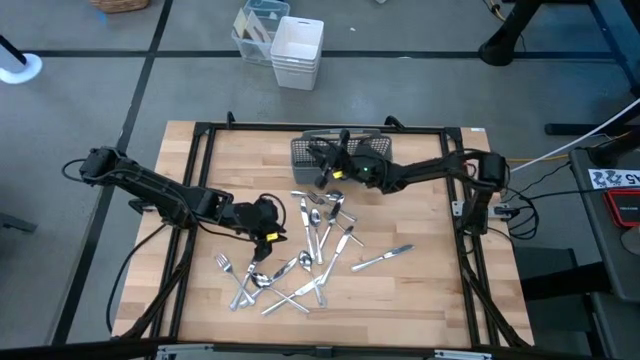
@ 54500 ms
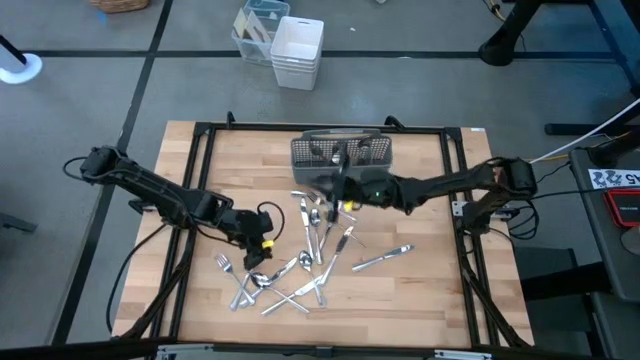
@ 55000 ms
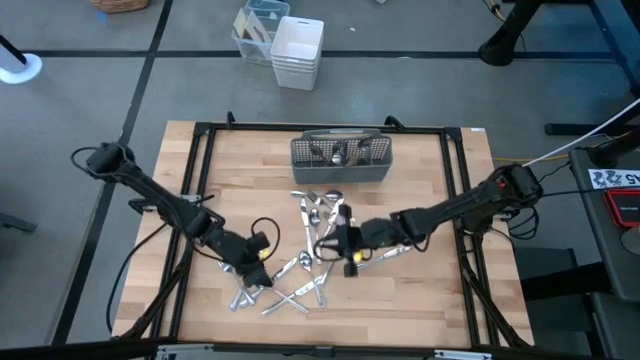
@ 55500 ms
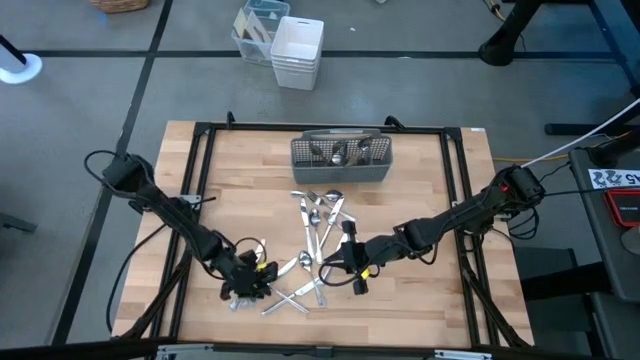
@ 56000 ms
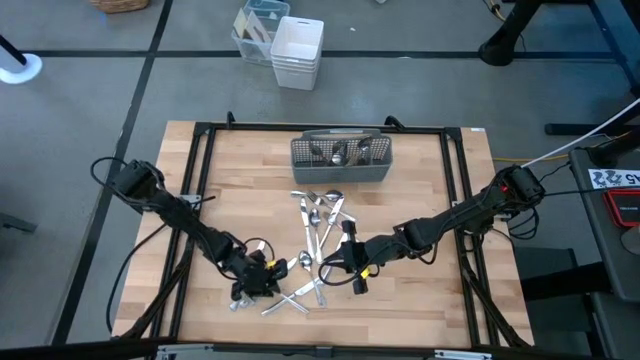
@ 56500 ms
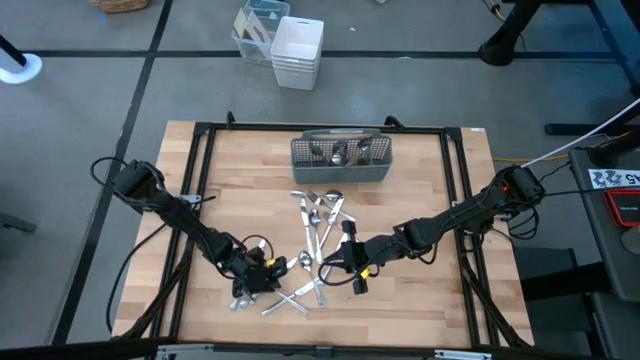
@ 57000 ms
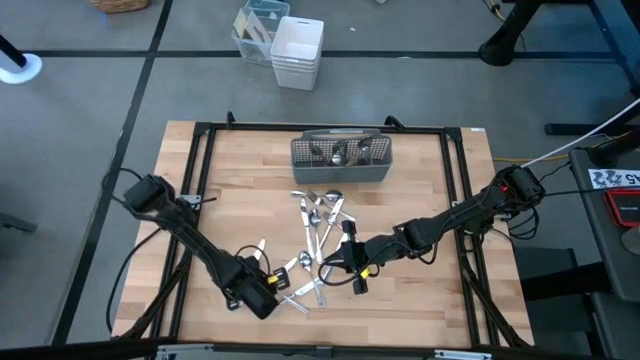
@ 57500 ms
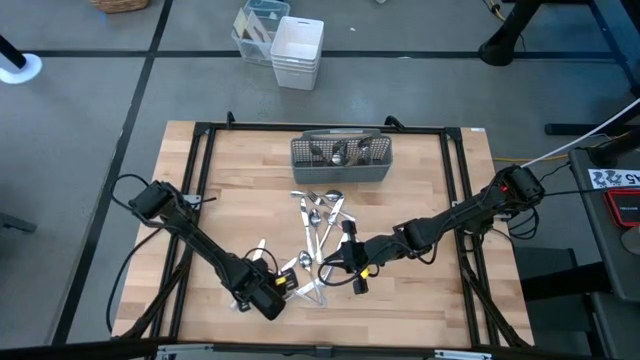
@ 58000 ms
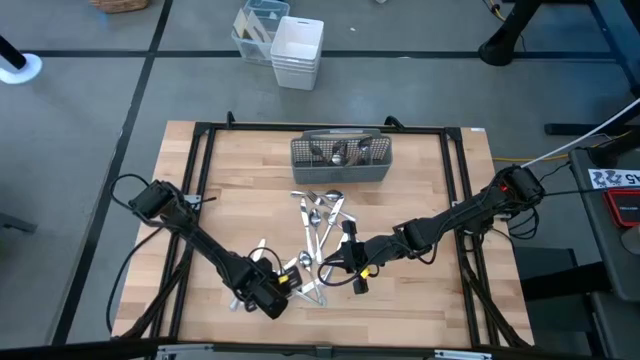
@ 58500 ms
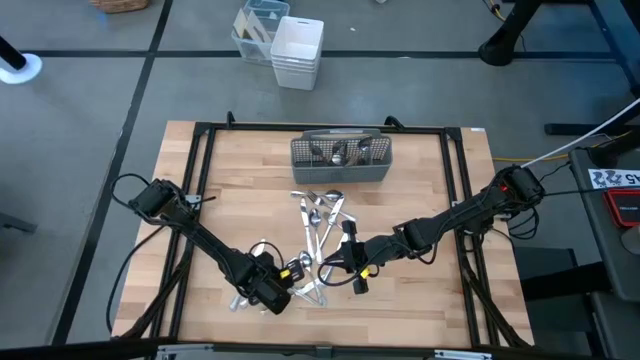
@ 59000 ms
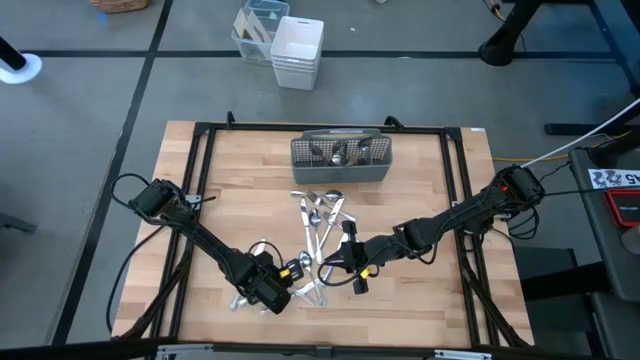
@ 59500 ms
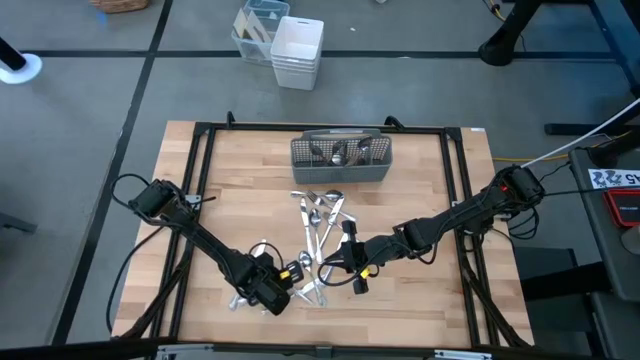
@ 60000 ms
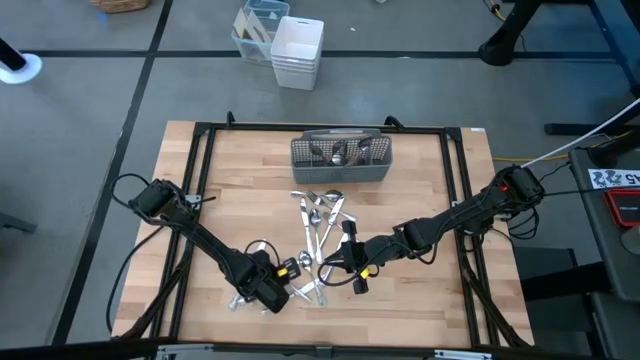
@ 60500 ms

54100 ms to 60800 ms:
Task: Sort silverware
Put the spoon into the silverware rack

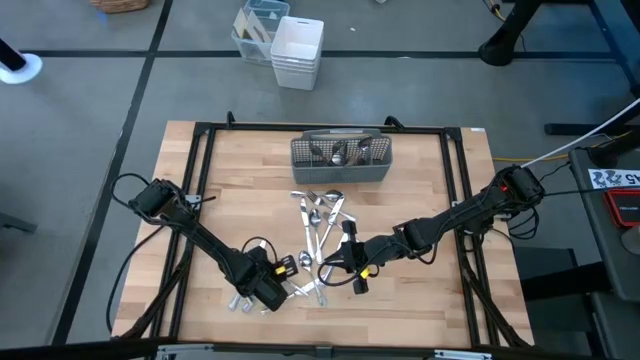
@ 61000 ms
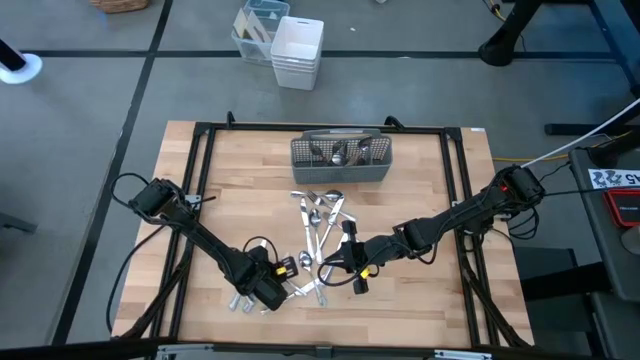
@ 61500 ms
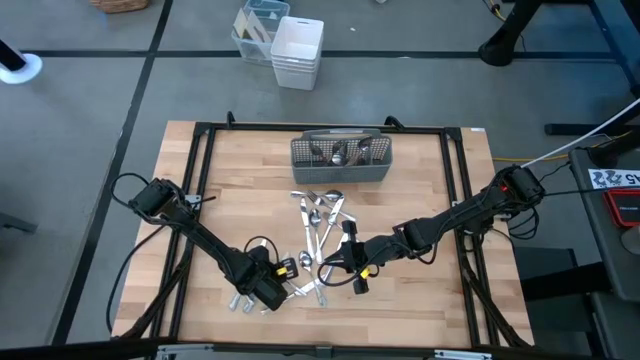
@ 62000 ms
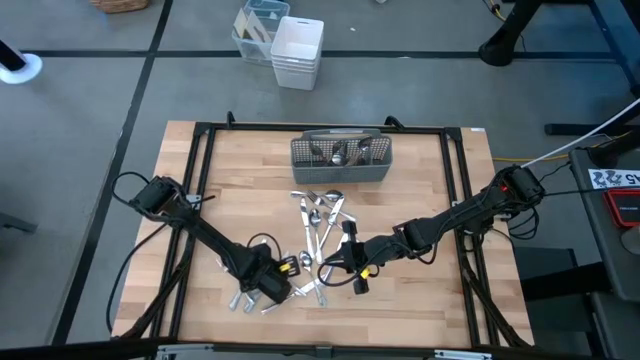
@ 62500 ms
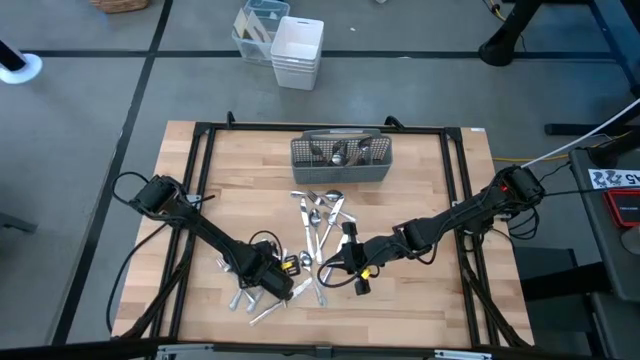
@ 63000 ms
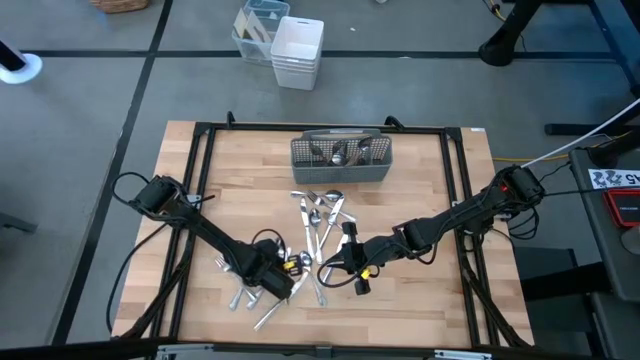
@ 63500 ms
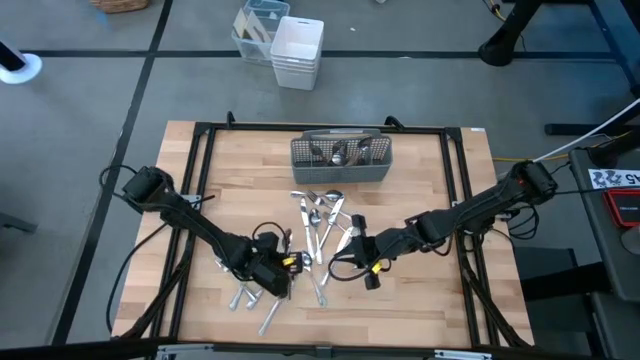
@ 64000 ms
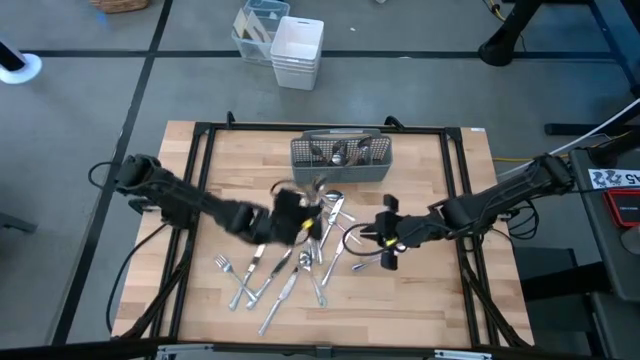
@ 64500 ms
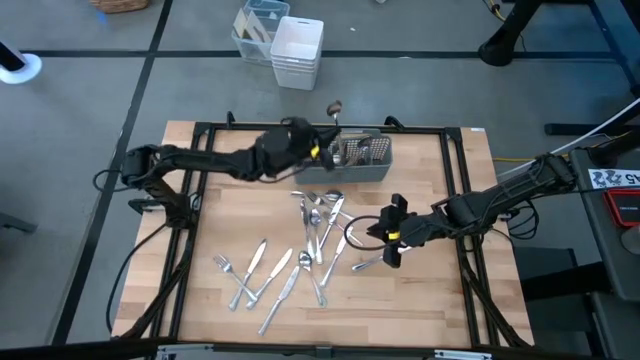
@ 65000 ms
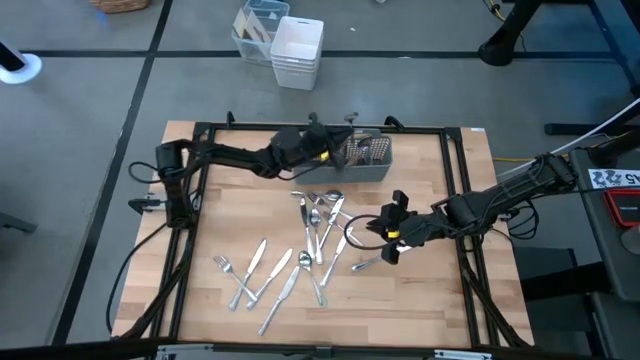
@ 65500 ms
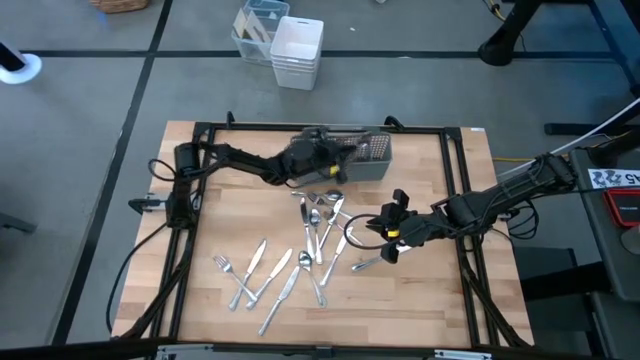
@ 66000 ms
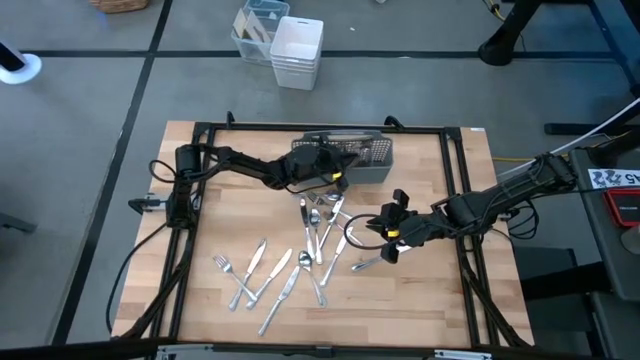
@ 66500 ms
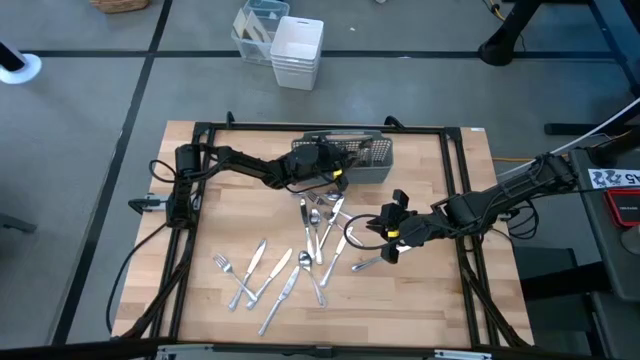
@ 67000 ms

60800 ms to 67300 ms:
Put the spoon into the silverware rack

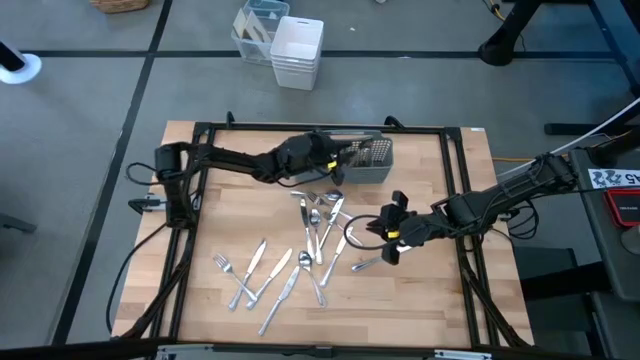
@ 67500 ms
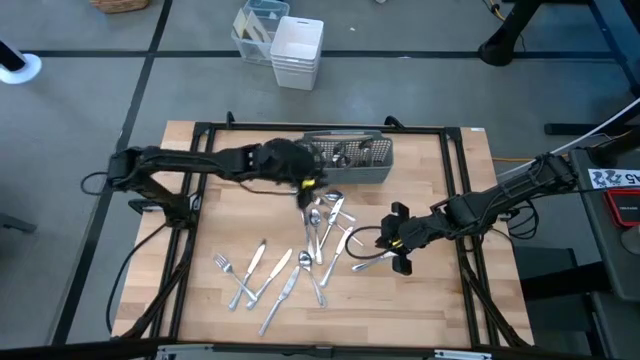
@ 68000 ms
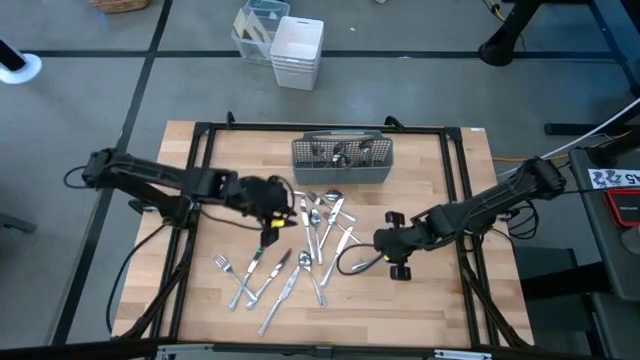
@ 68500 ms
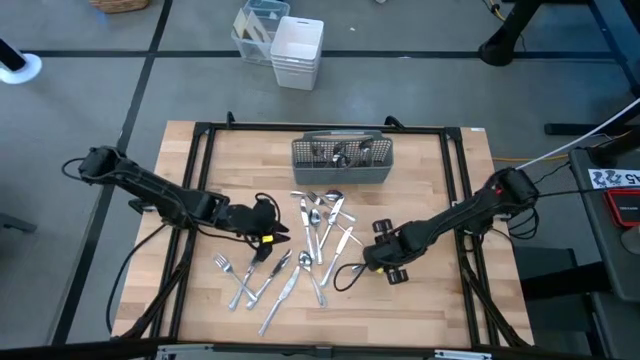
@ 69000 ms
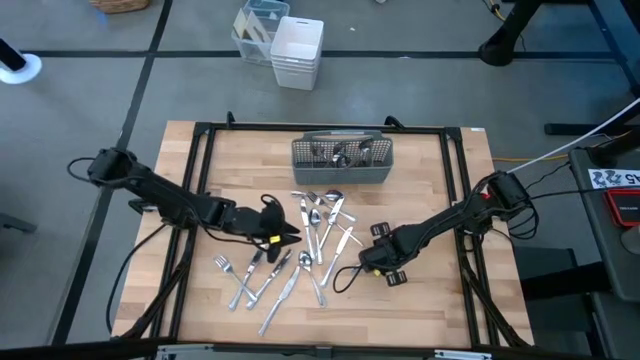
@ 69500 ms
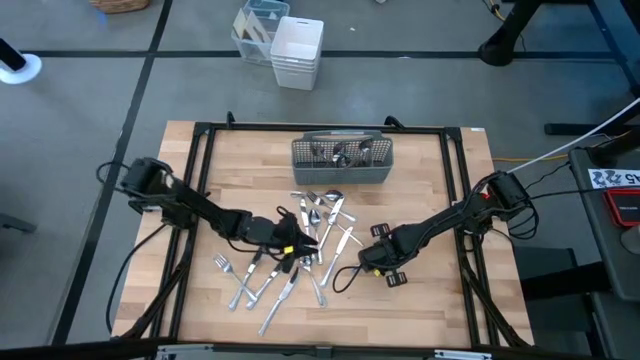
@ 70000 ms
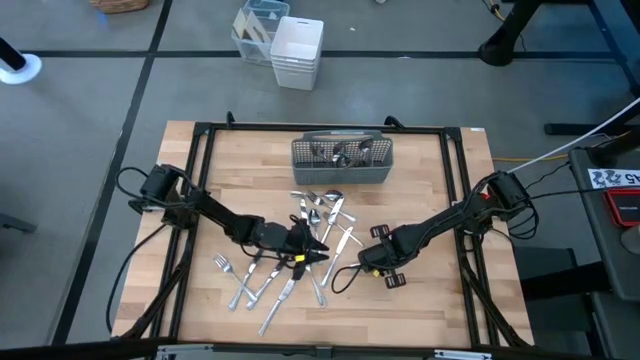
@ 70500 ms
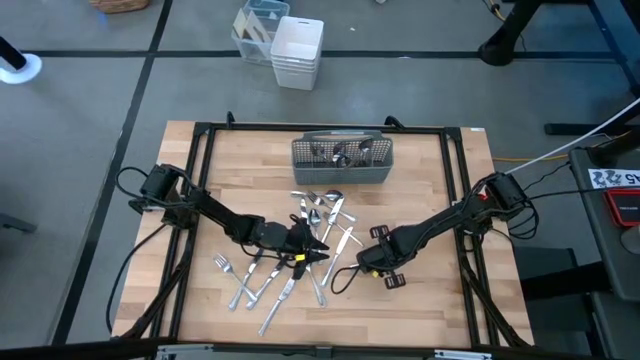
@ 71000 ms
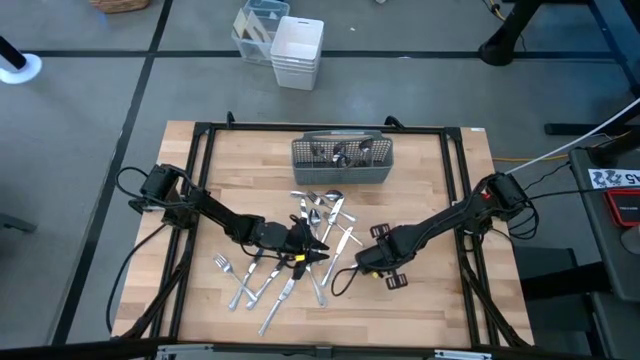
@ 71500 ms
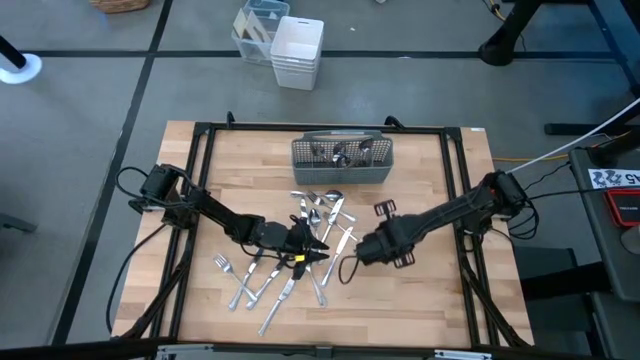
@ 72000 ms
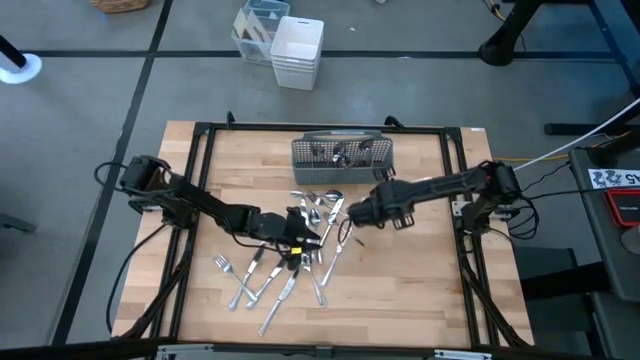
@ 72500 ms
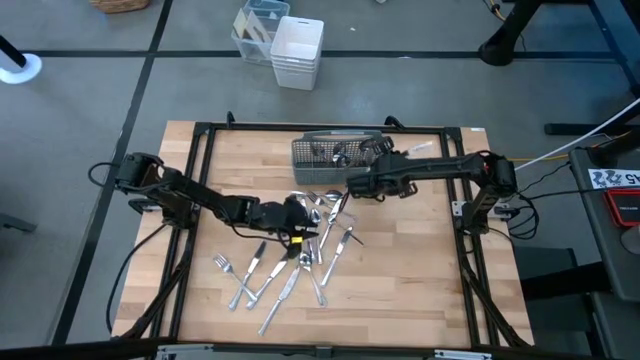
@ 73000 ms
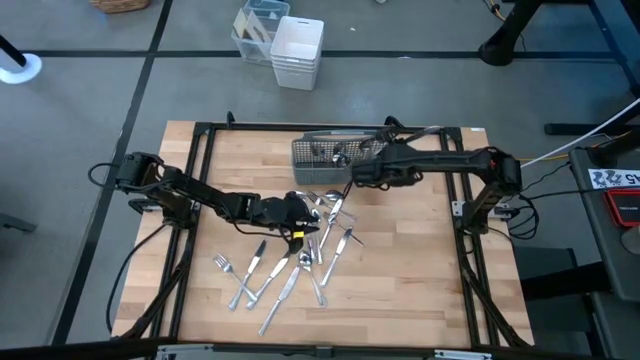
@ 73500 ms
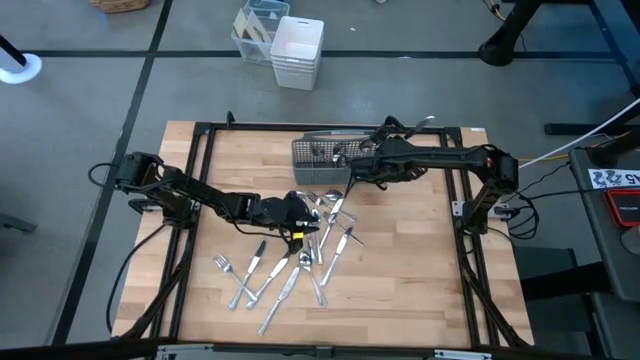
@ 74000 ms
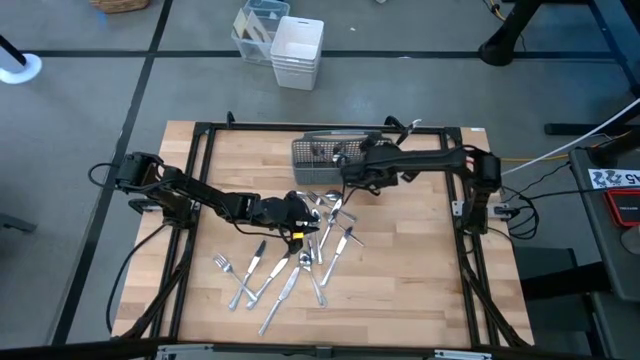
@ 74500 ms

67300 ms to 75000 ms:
Put the knife into the silverware rack

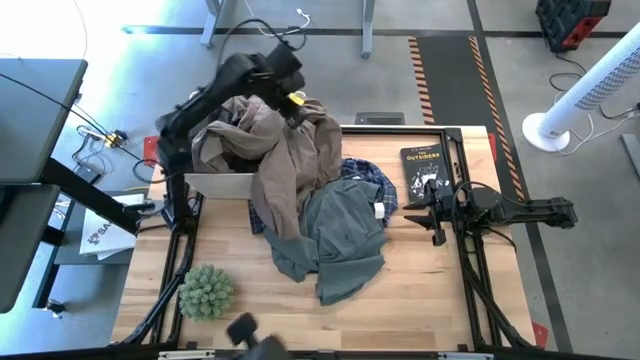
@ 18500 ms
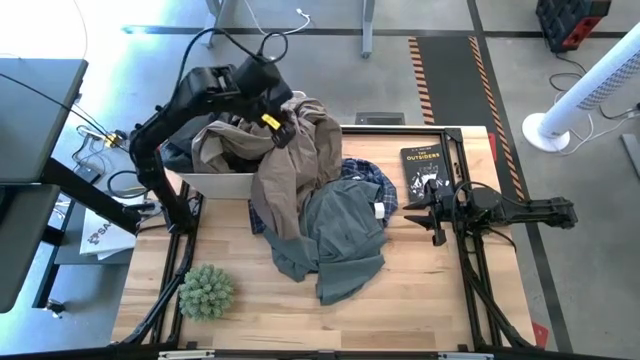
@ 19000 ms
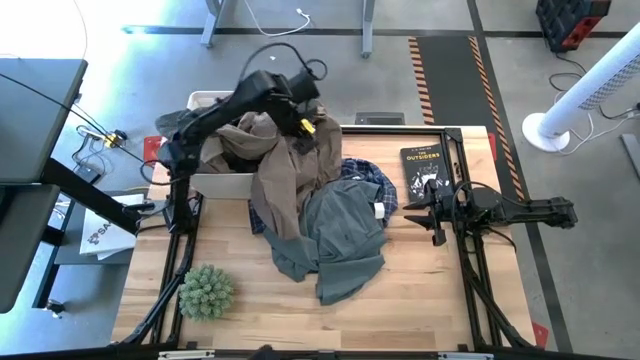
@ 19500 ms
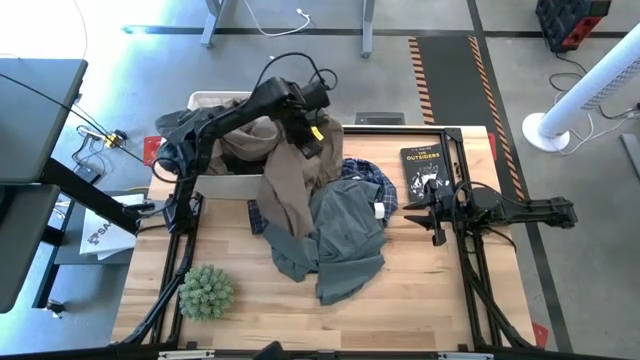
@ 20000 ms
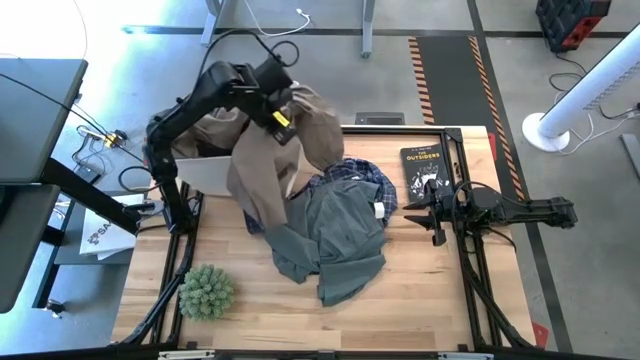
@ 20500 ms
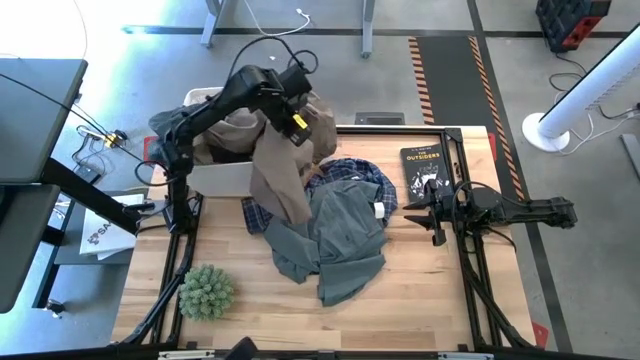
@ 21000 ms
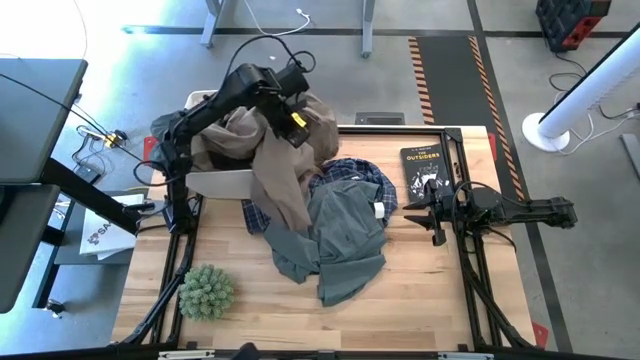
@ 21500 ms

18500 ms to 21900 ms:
Task: Sort clothes
Put the brown jacket into the white laundry bin
